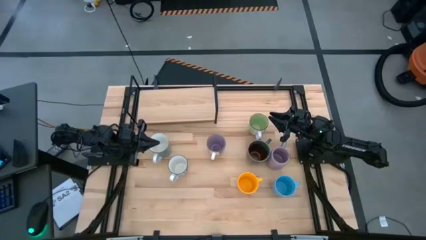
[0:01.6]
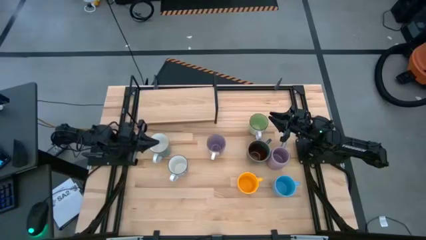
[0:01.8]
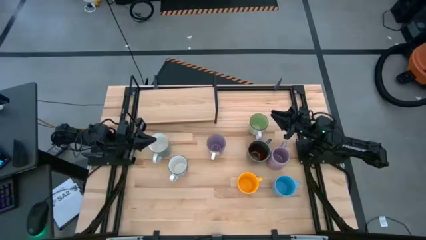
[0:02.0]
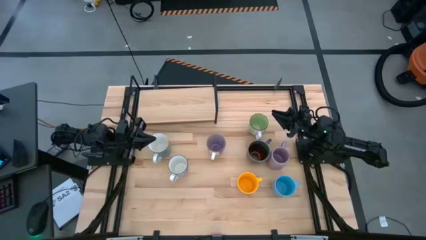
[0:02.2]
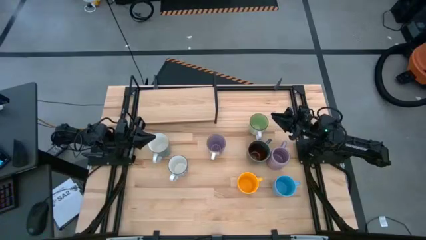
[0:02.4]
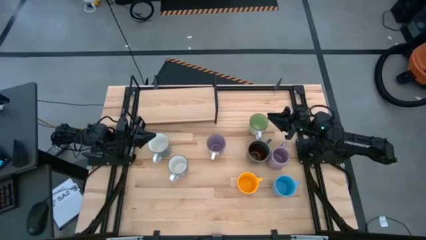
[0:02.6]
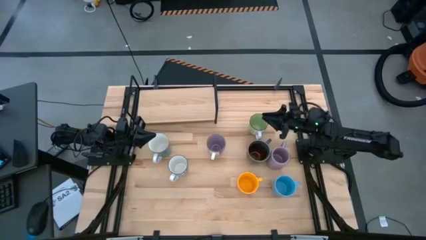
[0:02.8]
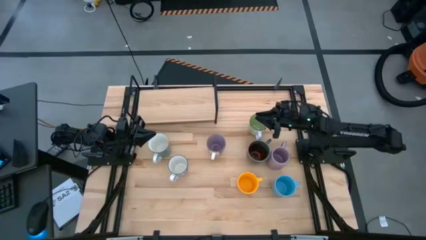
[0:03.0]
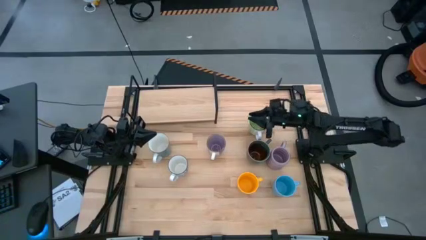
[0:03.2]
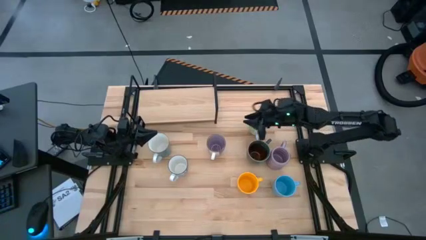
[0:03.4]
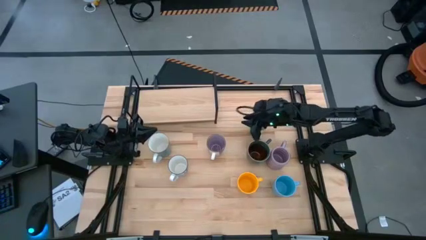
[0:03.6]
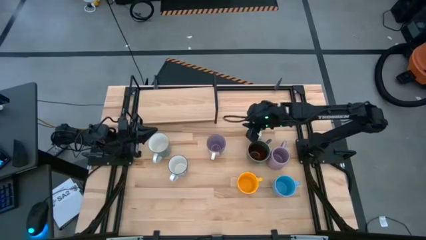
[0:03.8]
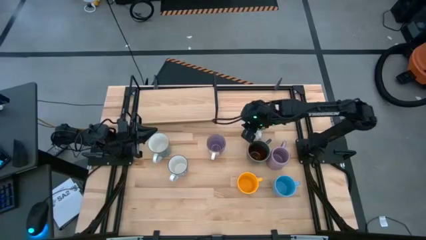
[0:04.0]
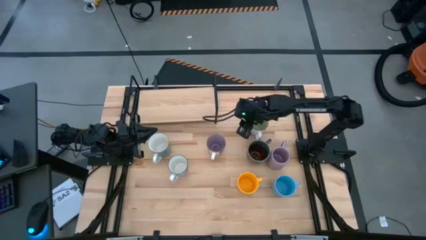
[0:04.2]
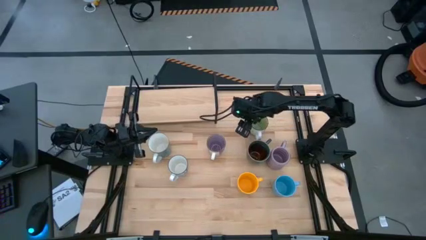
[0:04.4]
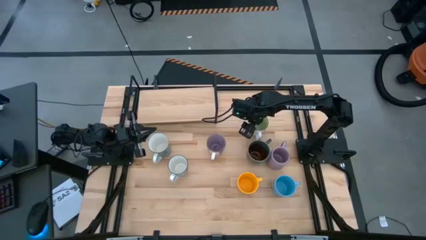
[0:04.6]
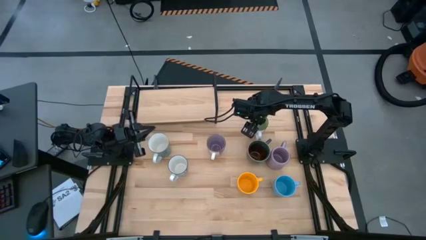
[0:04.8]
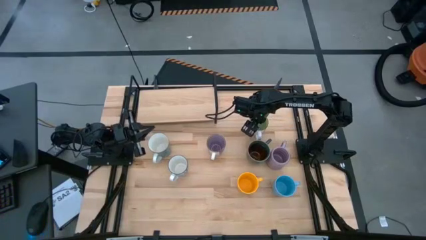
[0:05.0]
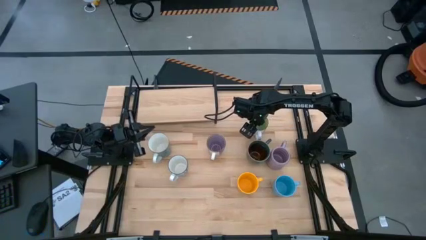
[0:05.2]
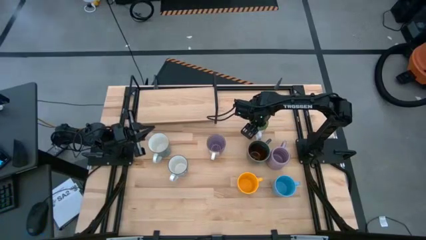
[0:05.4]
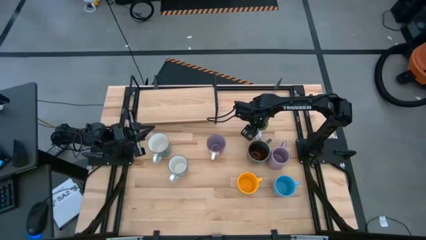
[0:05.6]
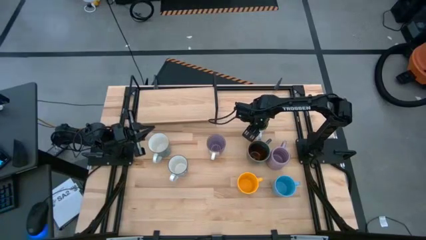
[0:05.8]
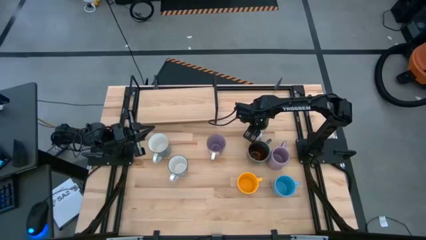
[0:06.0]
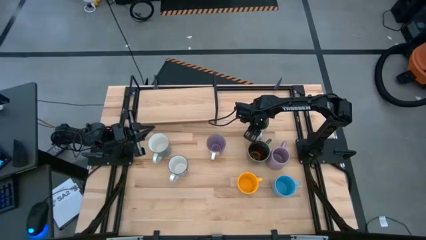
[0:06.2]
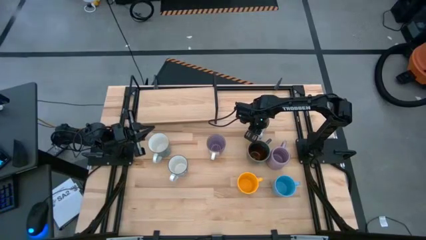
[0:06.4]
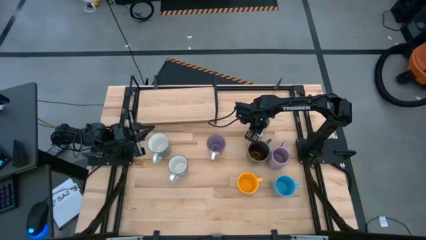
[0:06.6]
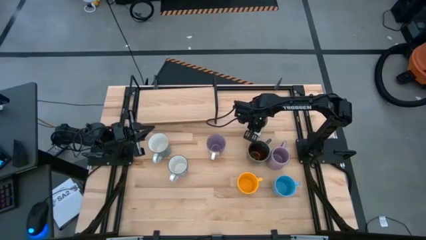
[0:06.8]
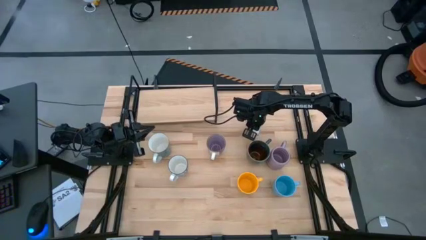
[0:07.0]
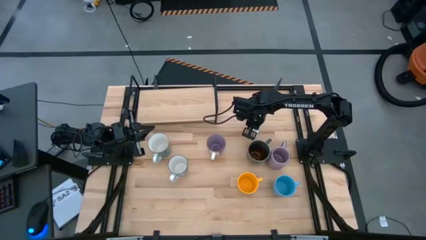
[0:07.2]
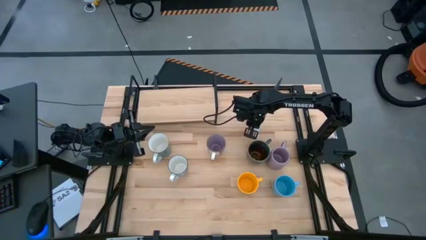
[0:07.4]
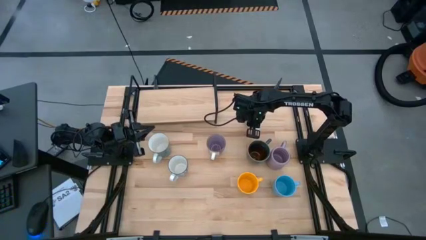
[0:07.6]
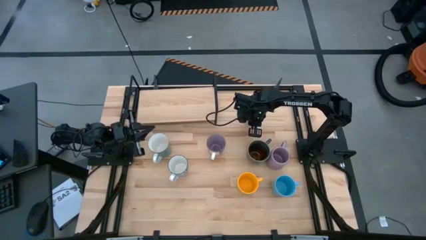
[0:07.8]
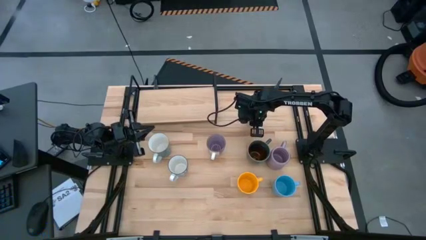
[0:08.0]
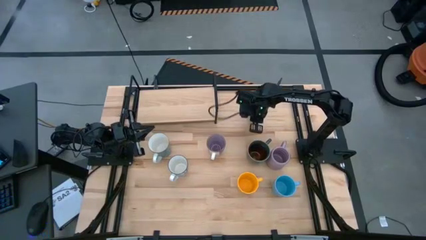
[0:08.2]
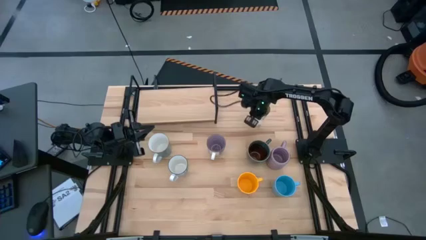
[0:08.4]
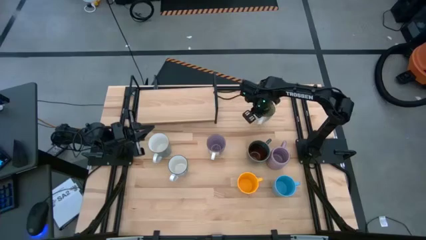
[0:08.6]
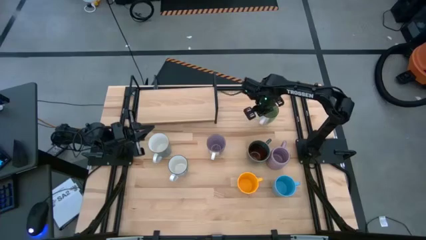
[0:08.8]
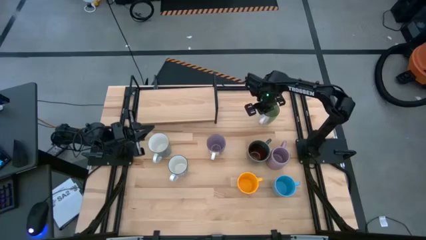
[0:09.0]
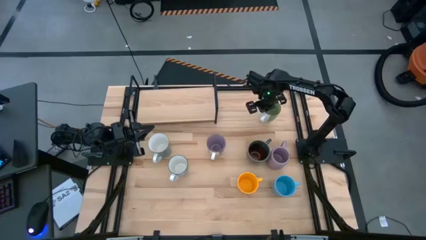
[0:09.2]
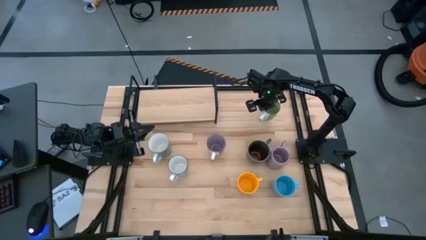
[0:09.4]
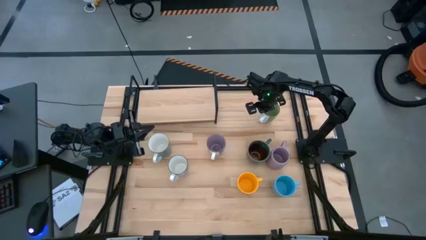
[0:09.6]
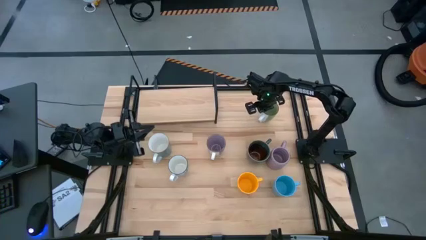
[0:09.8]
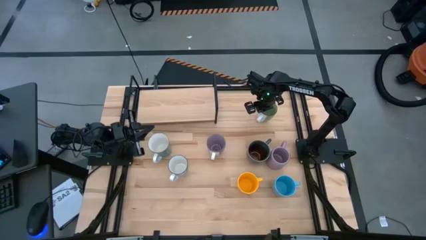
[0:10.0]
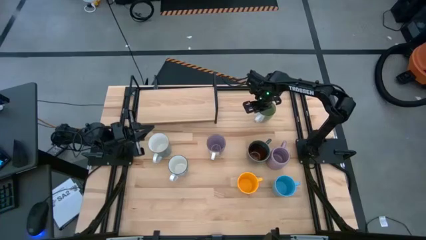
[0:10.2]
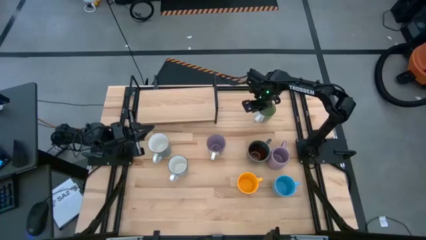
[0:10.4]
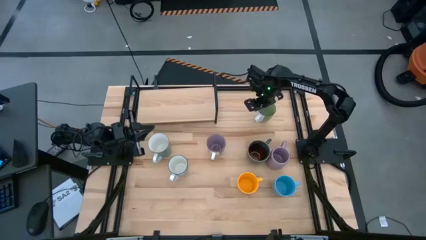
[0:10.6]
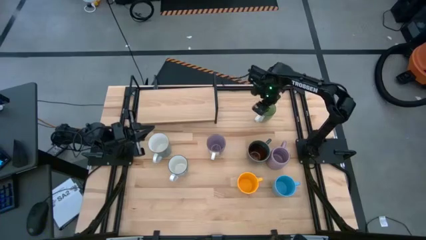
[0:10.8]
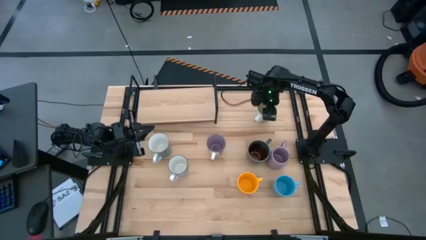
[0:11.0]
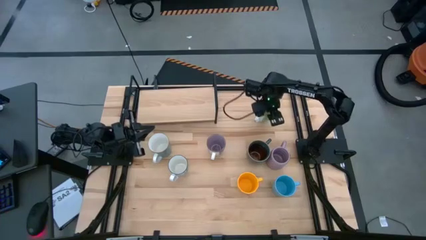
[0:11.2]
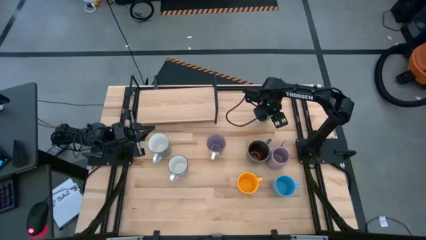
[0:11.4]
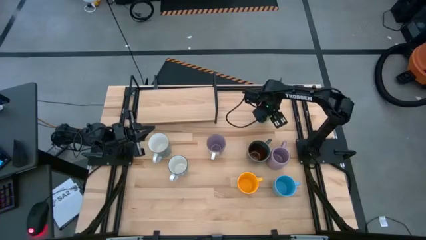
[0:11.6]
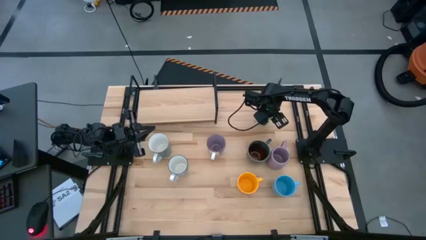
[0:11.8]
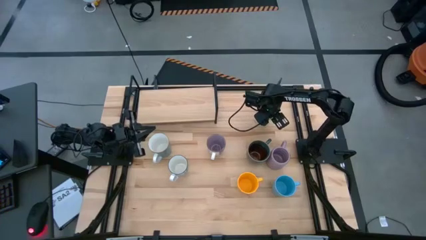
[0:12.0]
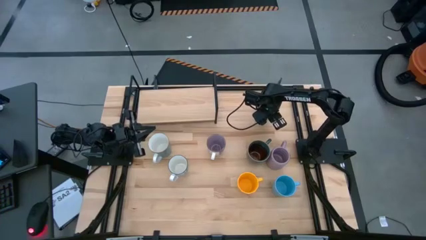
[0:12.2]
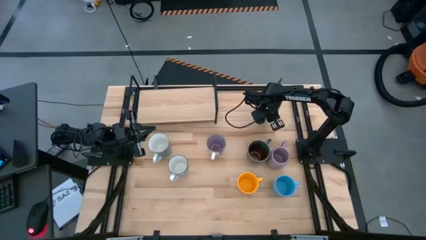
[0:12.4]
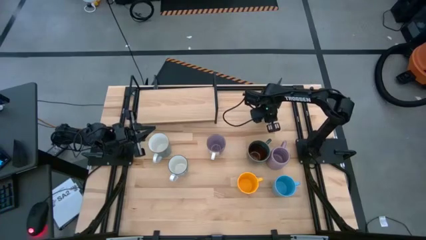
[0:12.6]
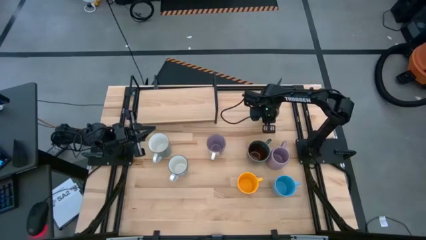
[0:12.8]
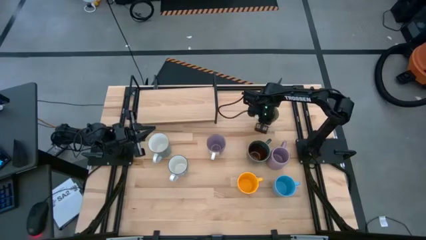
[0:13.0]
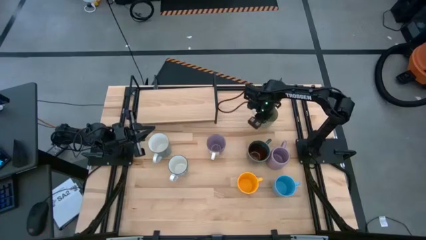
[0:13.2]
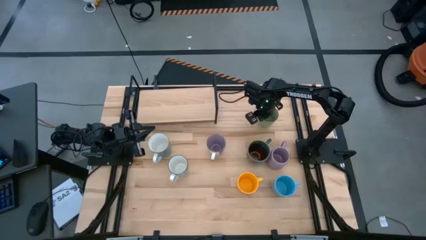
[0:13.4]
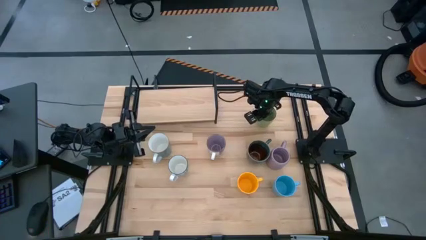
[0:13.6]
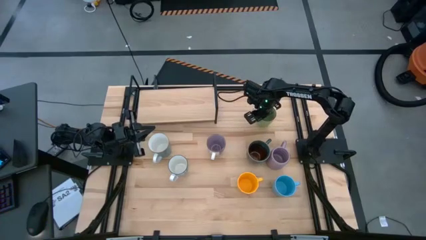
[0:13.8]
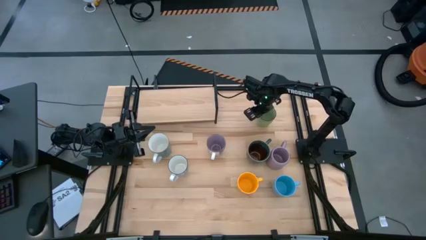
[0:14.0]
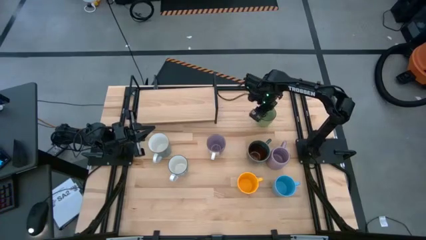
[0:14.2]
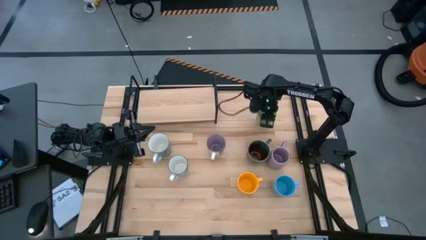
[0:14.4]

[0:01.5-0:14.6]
Task: Place coffee mugs
Put the green patterned mug on the shelf
